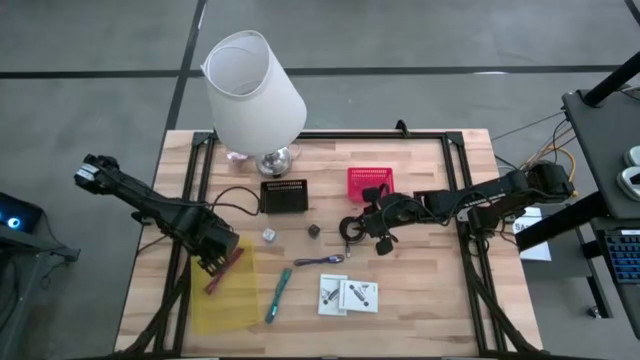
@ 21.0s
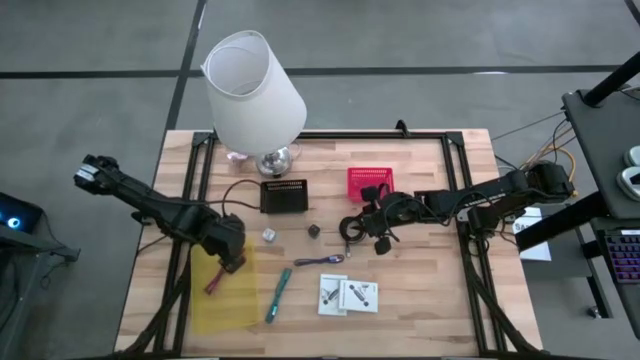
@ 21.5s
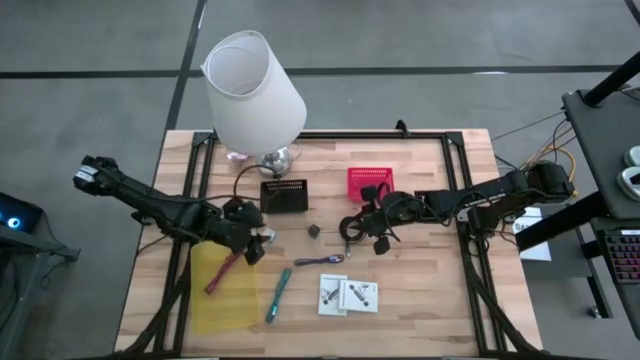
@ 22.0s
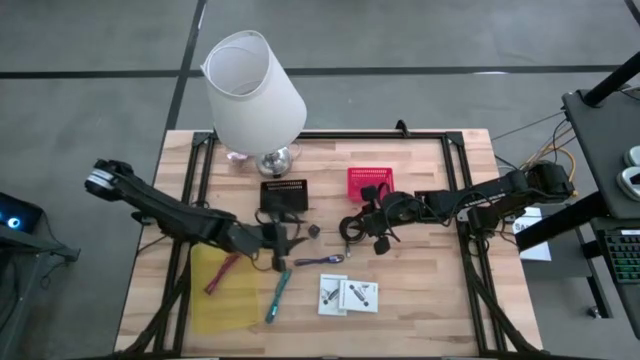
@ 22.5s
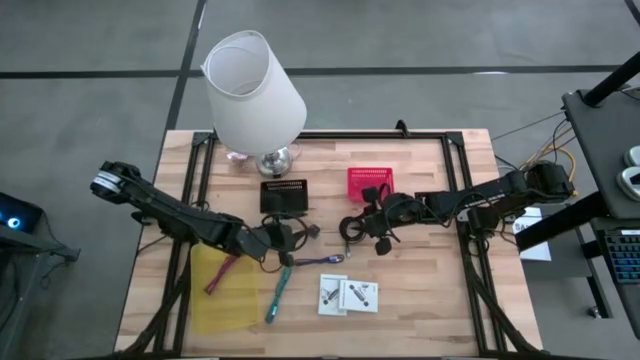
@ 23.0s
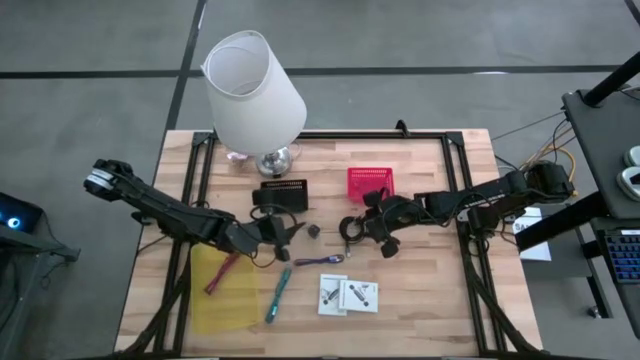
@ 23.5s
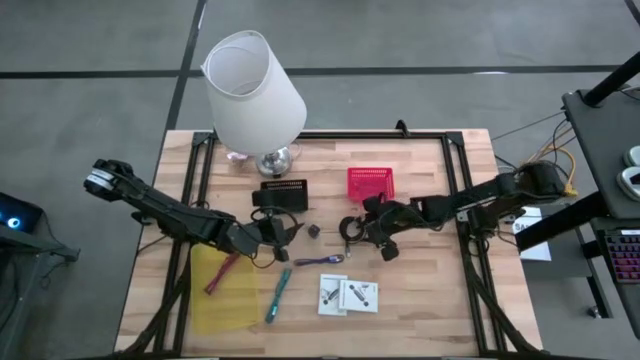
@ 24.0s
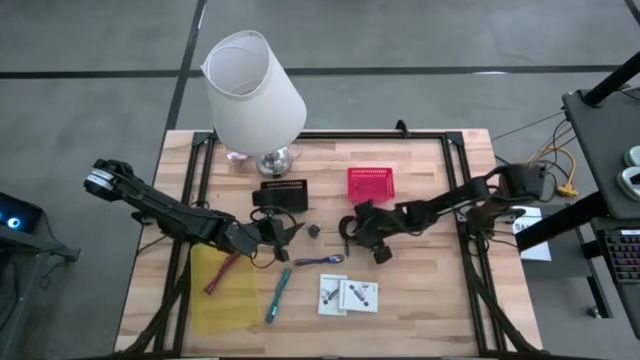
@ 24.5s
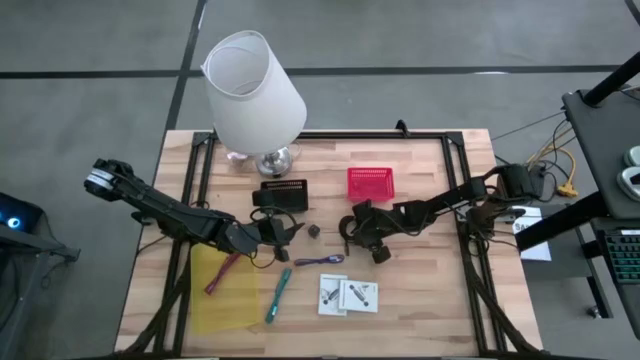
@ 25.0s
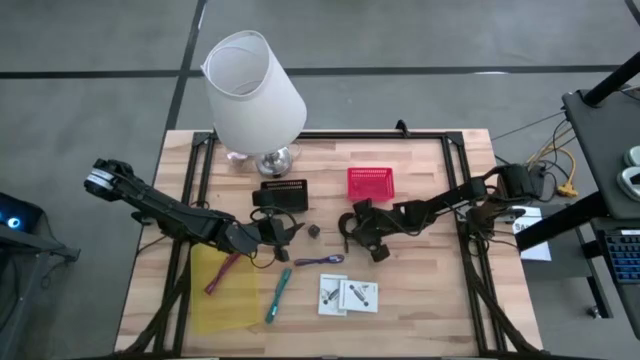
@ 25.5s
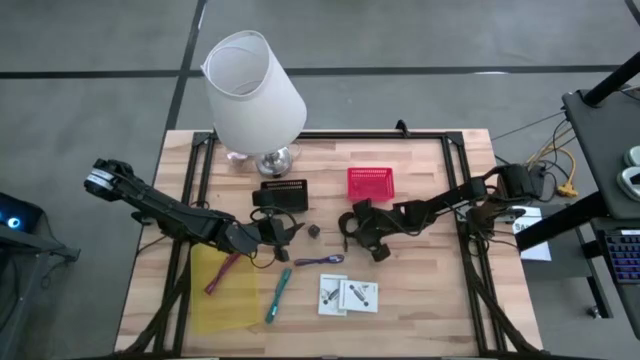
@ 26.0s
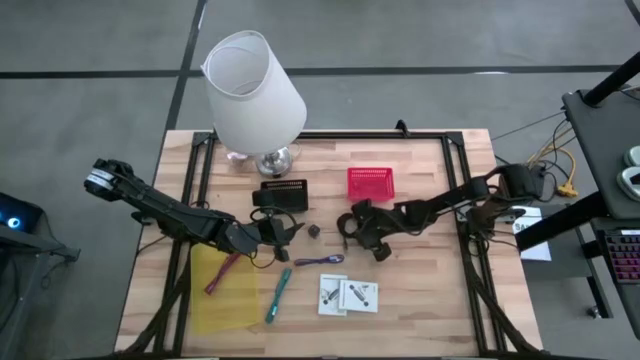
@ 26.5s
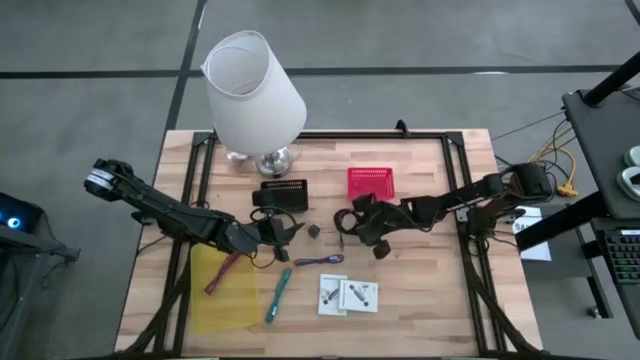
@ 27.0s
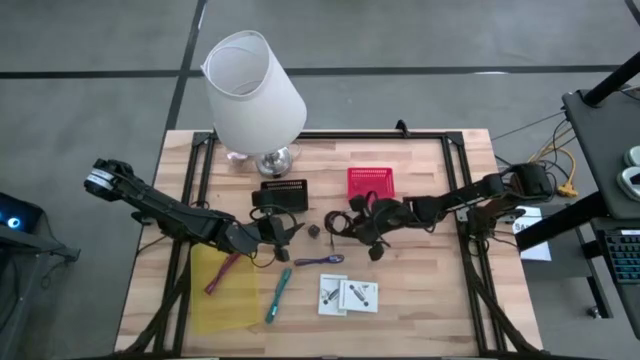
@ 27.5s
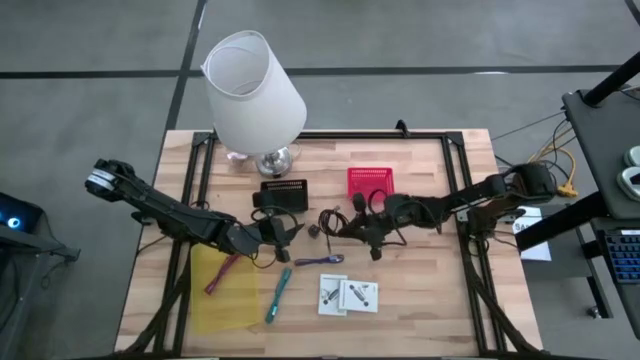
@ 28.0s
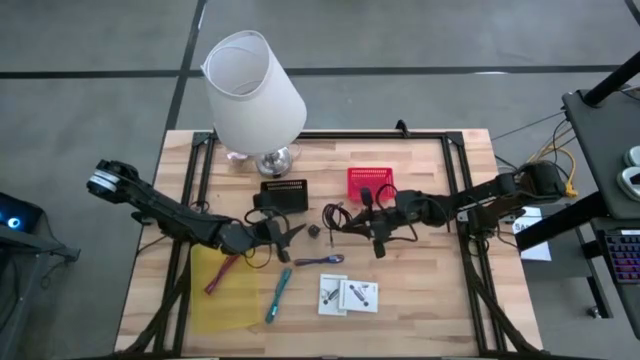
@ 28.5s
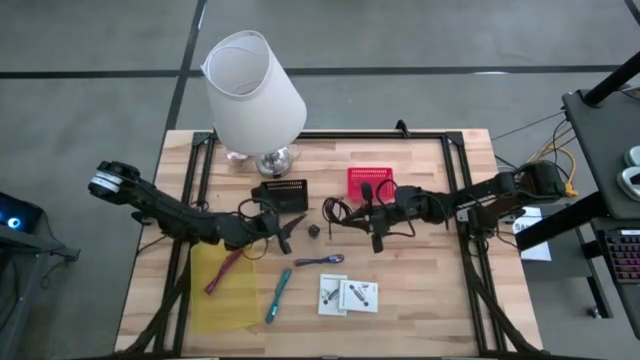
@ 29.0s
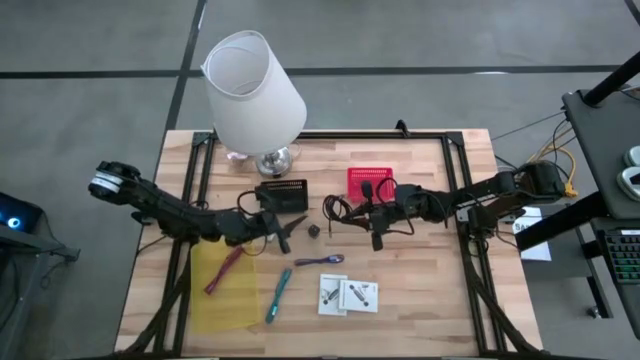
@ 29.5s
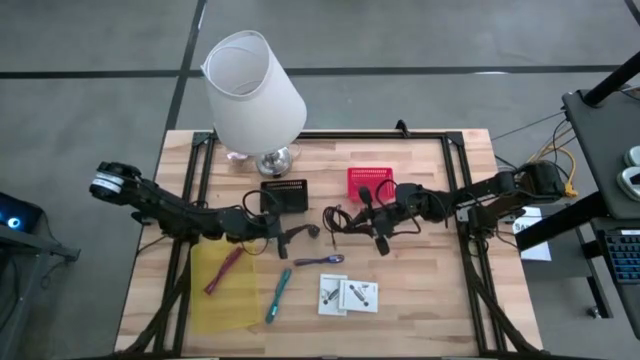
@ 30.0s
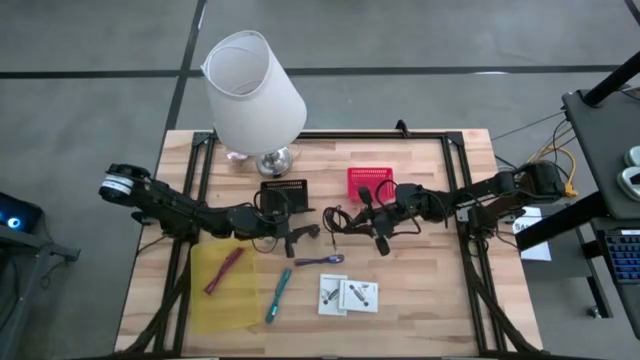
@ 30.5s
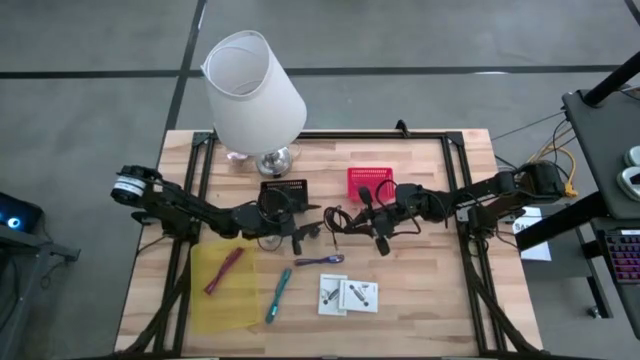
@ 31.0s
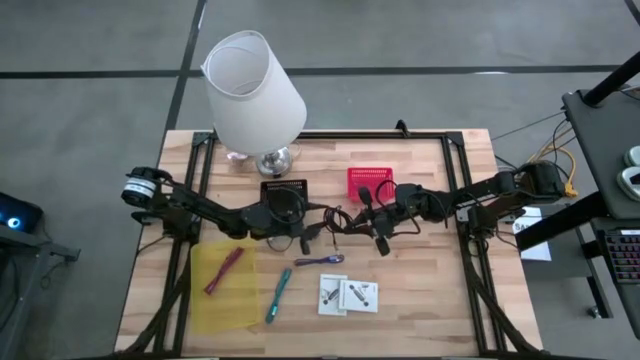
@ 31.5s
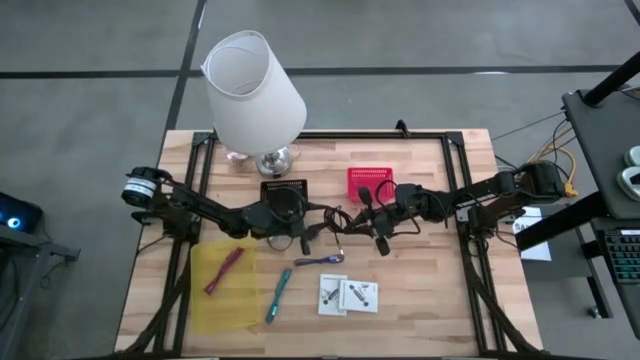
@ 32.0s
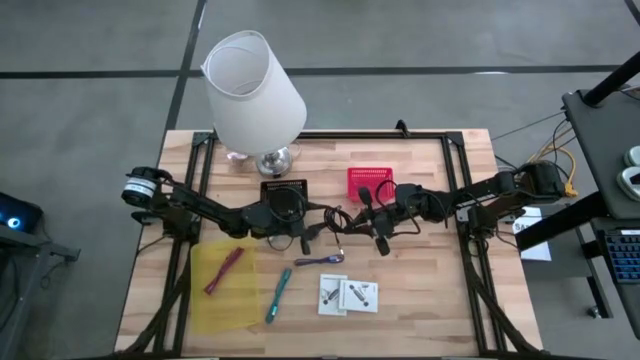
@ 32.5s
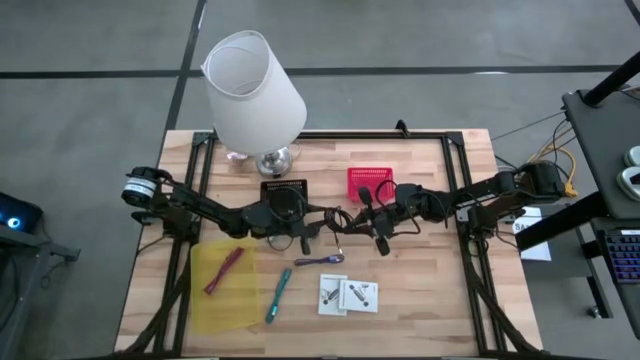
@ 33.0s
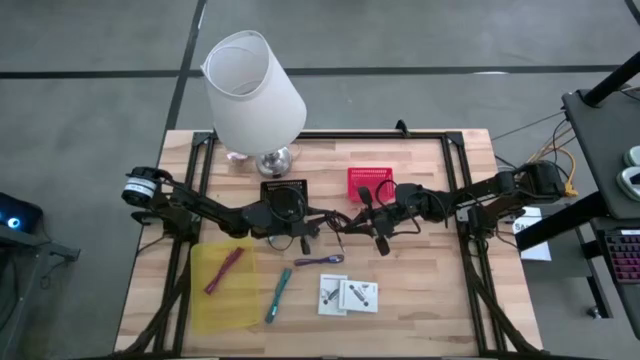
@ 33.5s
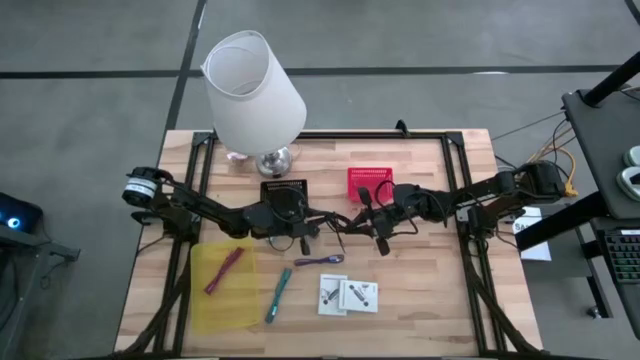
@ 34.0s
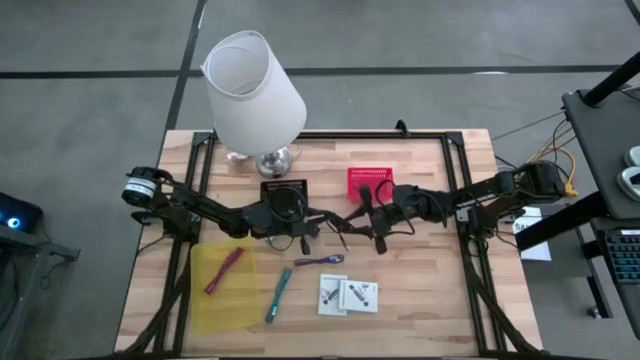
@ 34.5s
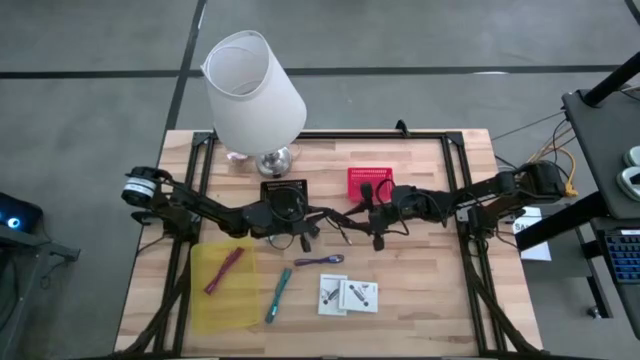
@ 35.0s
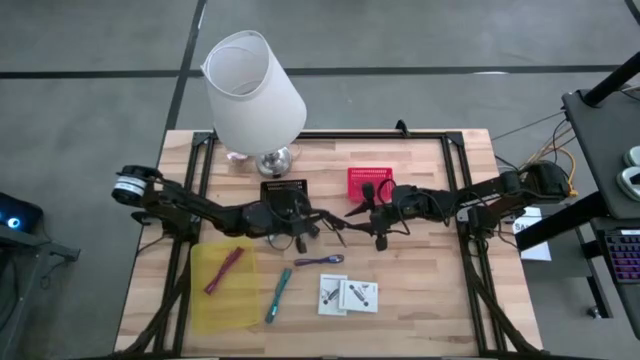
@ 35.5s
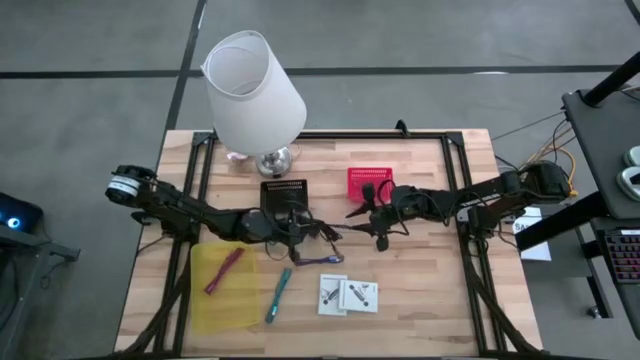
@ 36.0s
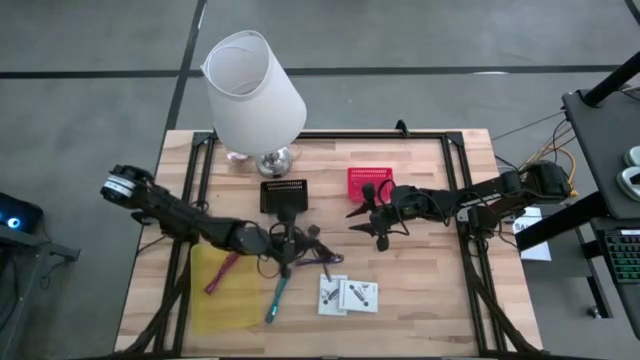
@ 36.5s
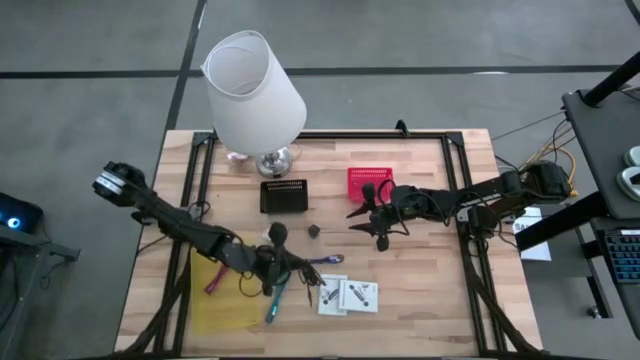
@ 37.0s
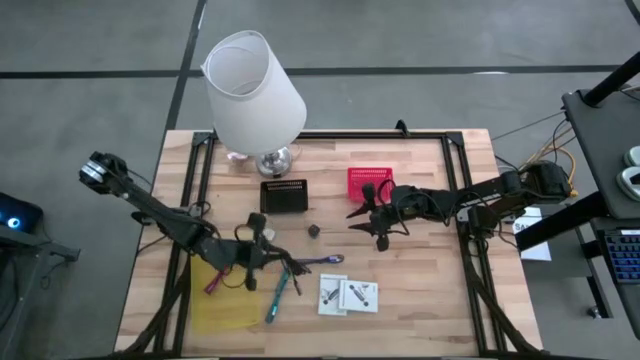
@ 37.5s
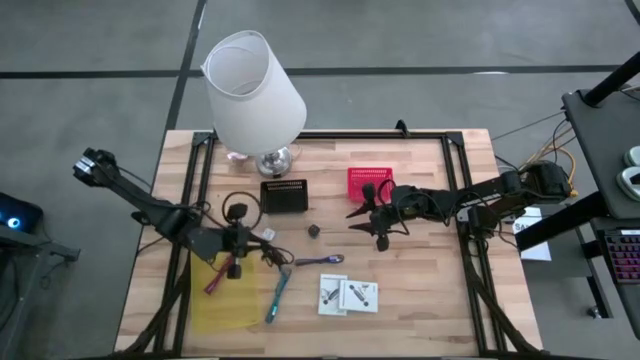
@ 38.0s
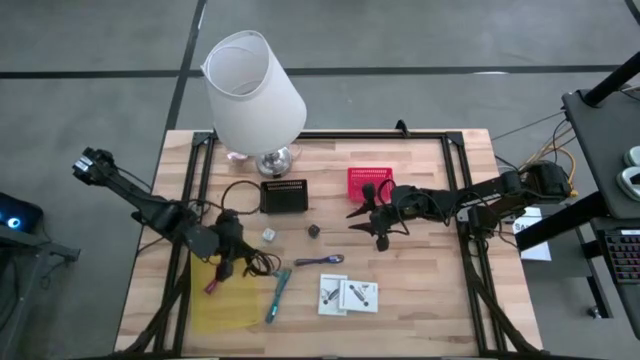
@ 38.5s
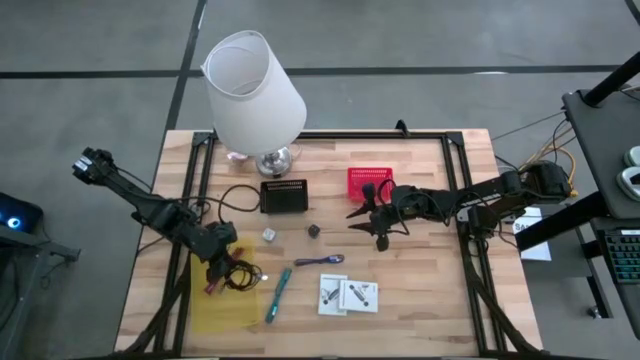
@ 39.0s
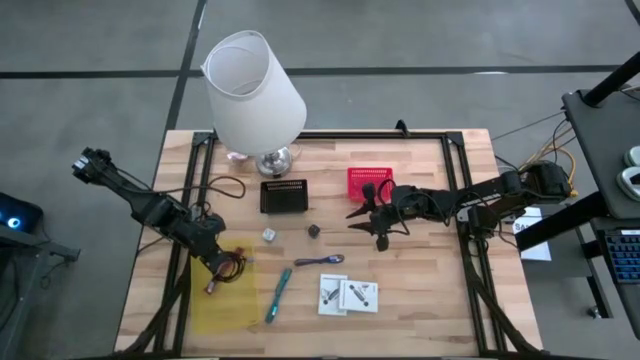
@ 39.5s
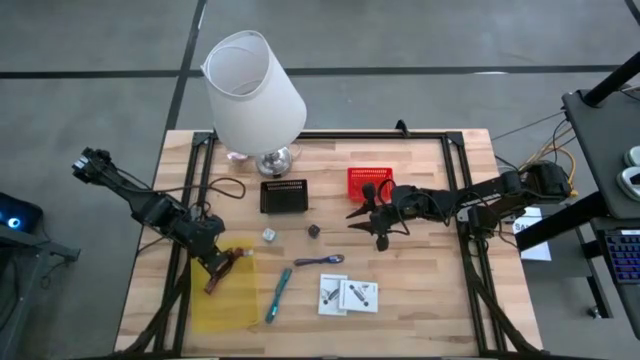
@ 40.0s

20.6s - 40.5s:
Task: Pick and place items into bin
Put the black charger cable into the yellow bin
